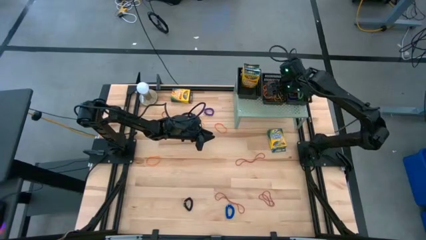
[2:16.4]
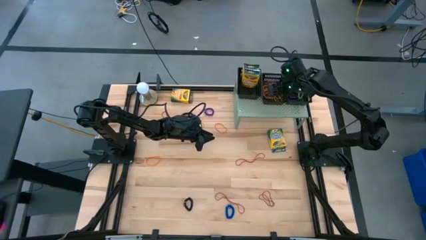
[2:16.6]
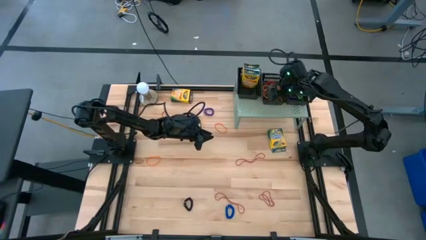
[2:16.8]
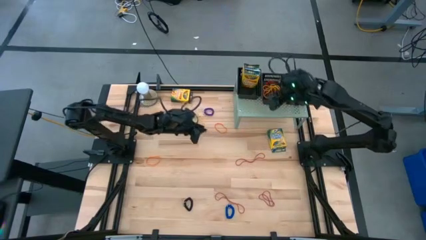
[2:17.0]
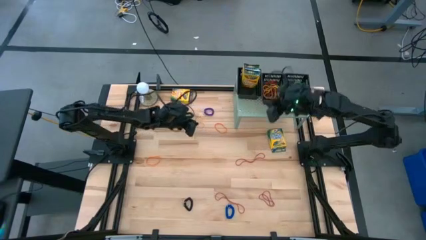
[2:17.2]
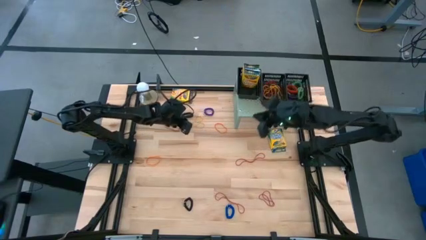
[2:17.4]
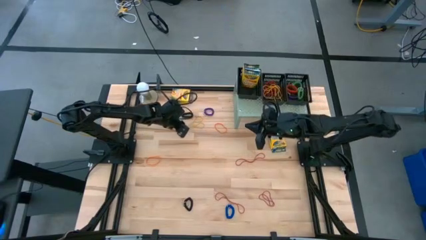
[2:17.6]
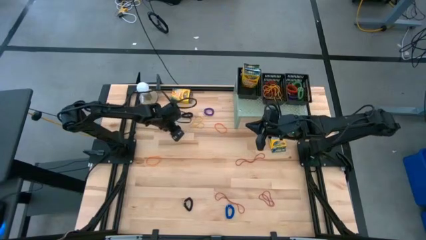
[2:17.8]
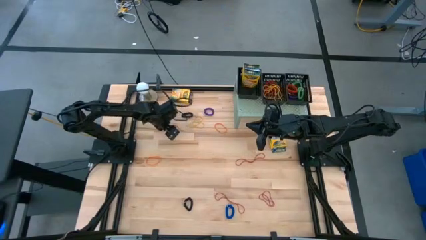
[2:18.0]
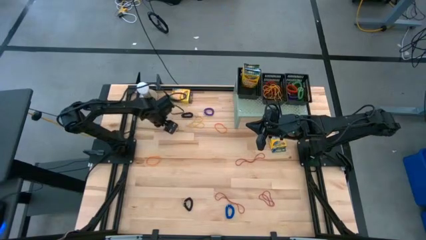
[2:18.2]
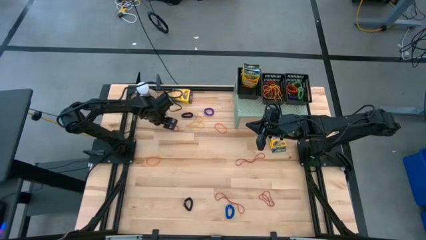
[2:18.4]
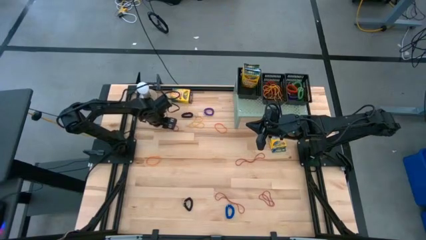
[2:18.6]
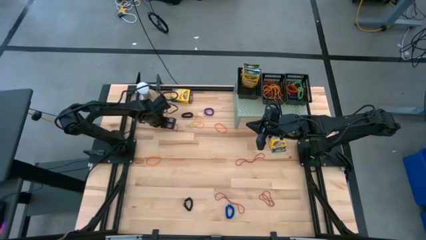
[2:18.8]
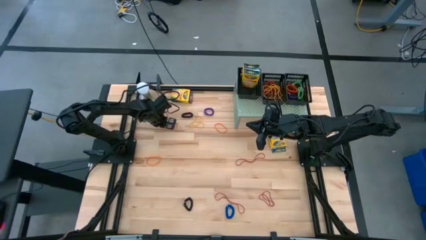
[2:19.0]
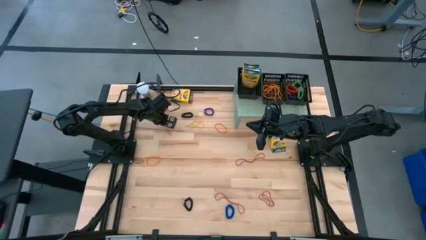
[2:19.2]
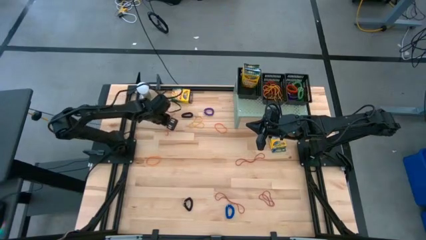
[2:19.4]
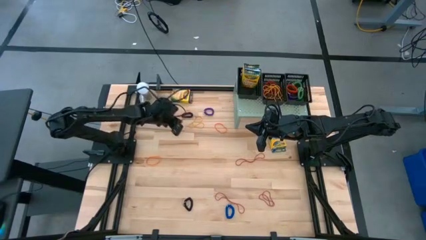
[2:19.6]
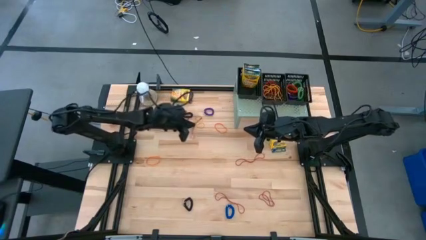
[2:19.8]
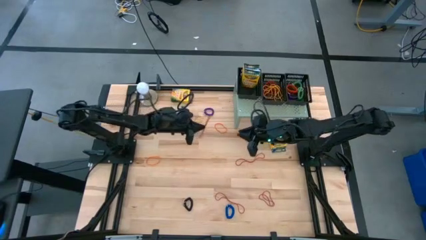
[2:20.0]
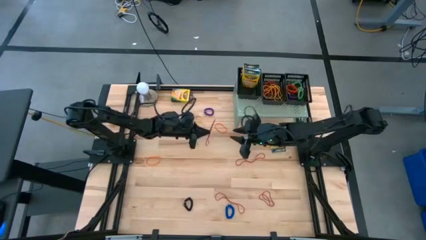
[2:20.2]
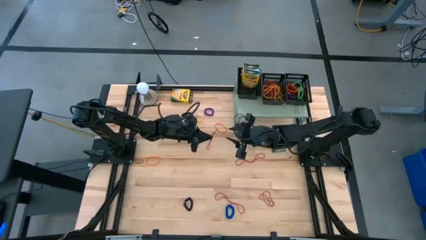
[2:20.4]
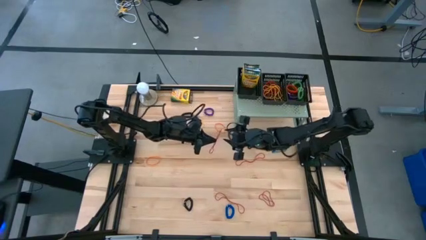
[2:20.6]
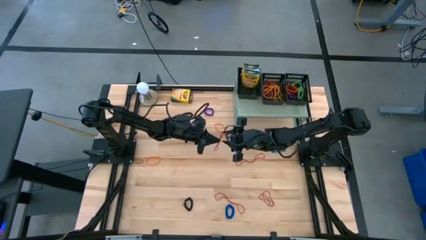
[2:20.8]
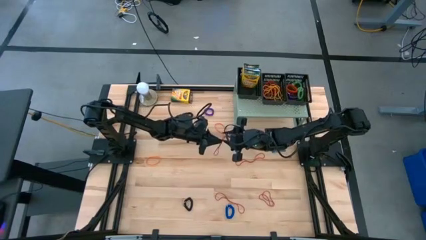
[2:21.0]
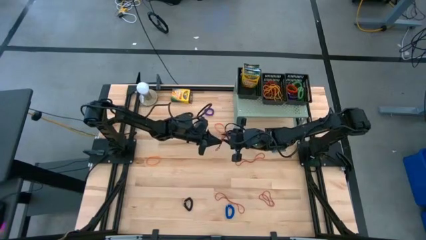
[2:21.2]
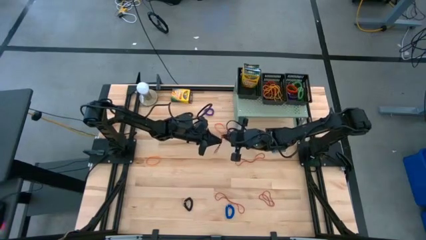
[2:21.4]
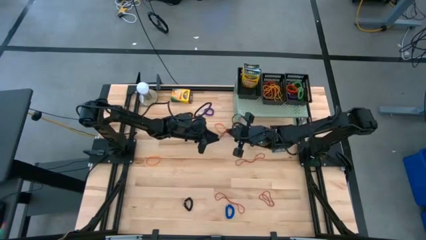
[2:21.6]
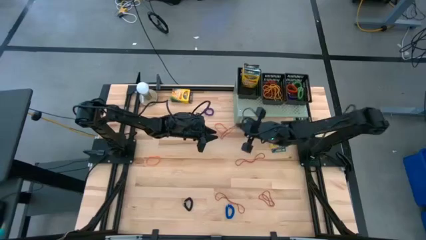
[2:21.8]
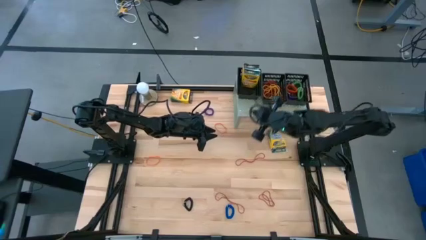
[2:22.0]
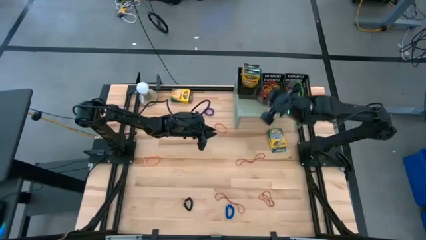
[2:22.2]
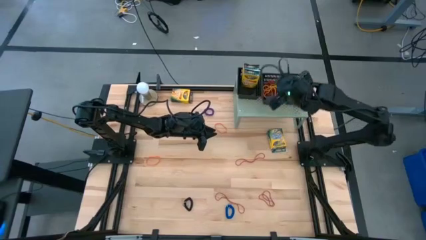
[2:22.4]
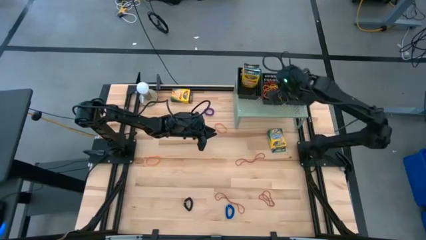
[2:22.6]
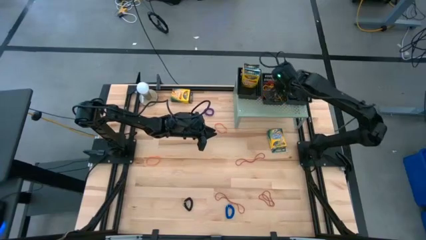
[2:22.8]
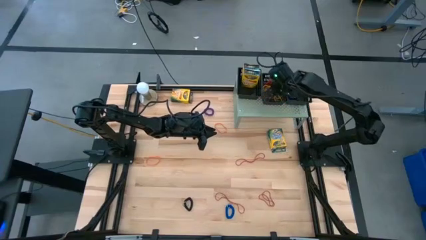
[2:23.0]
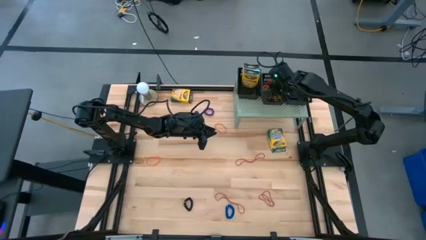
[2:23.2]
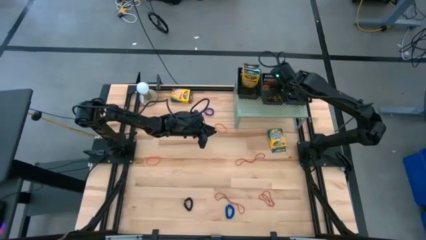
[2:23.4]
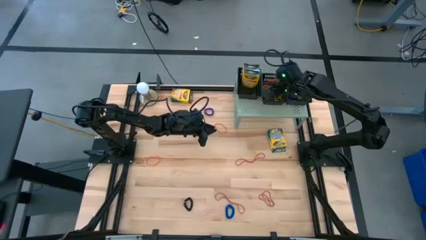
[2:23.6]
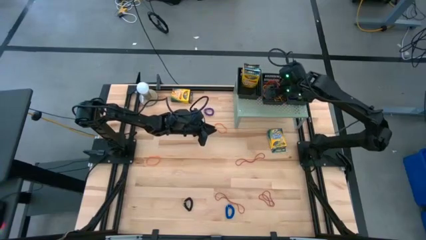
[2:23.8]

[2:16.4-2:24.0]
Task: Pick & Place Office Desk Supplies
Put the red rubber band into the middle black basket on the shelf

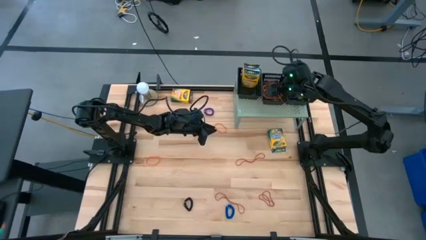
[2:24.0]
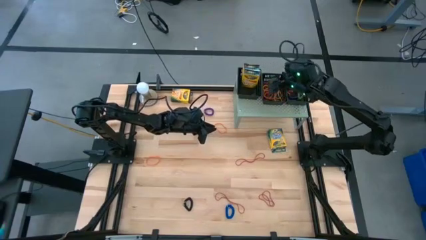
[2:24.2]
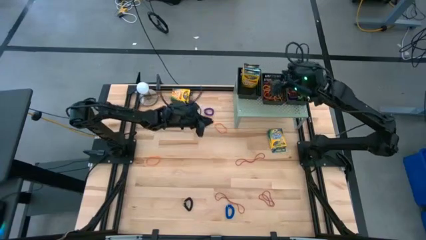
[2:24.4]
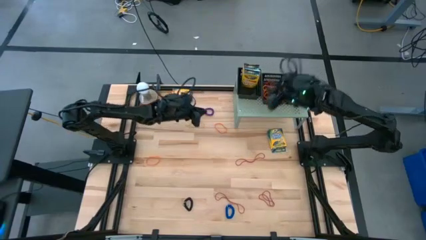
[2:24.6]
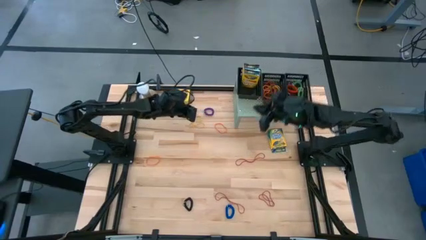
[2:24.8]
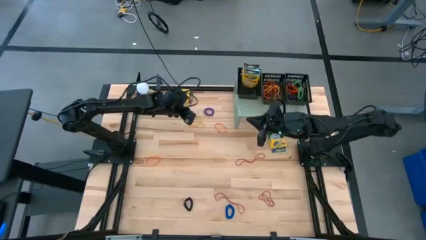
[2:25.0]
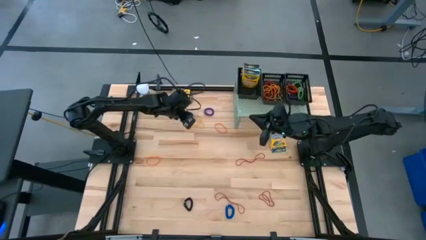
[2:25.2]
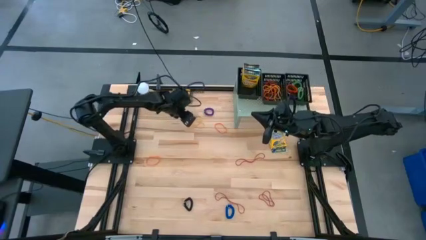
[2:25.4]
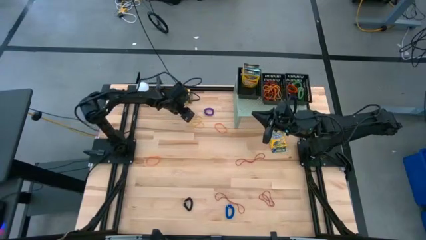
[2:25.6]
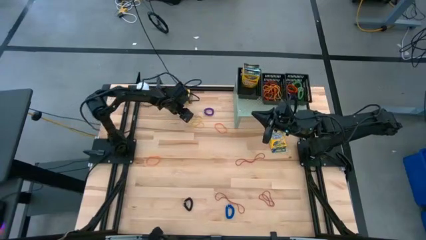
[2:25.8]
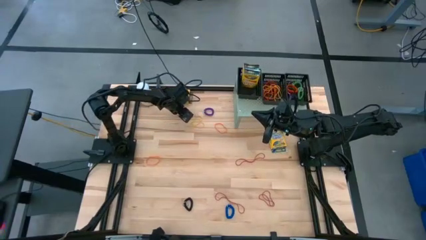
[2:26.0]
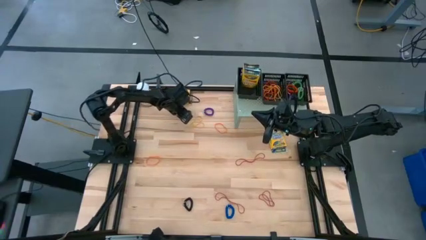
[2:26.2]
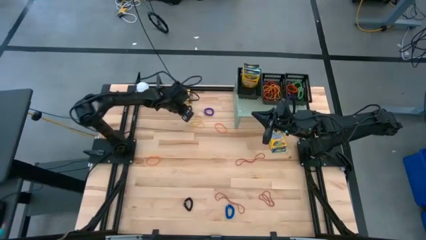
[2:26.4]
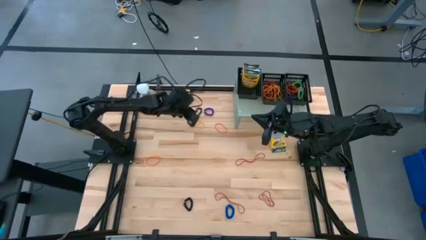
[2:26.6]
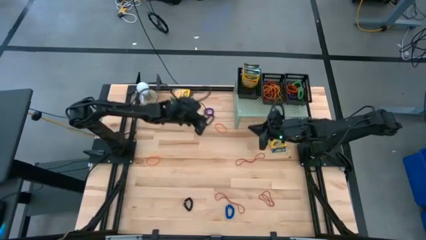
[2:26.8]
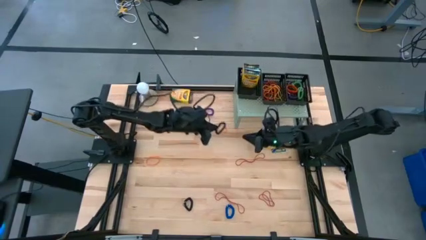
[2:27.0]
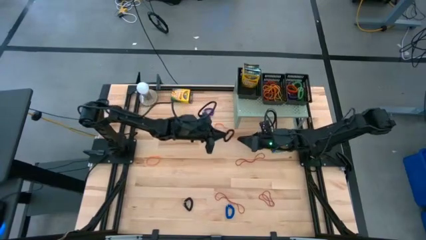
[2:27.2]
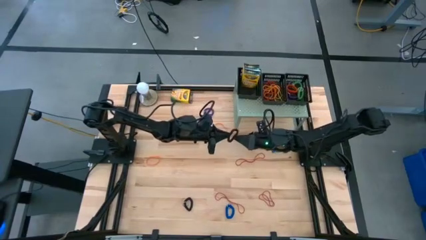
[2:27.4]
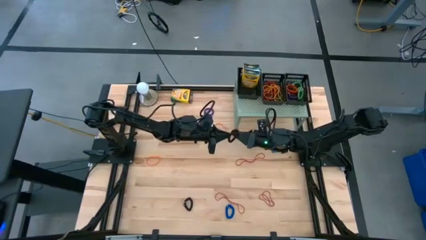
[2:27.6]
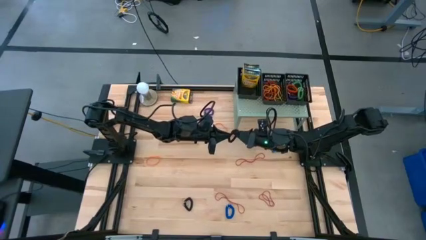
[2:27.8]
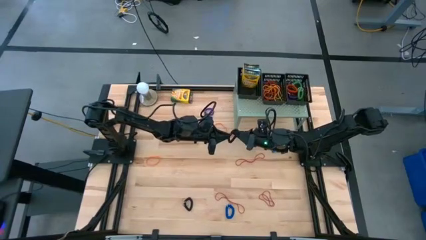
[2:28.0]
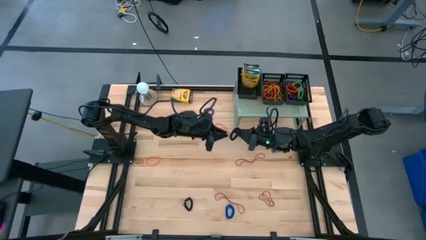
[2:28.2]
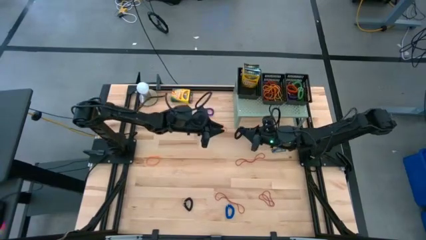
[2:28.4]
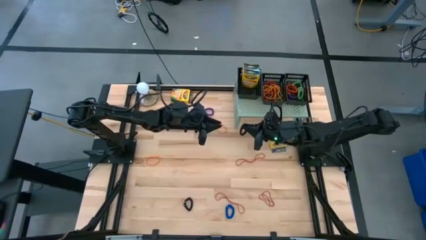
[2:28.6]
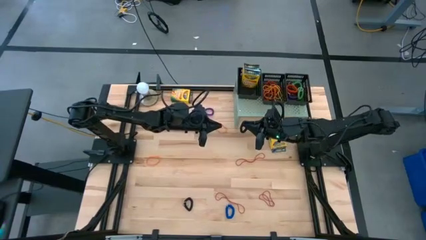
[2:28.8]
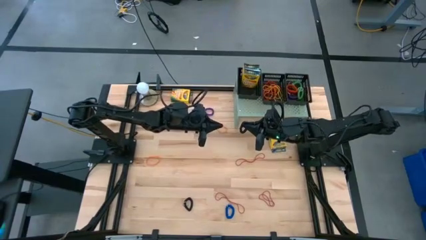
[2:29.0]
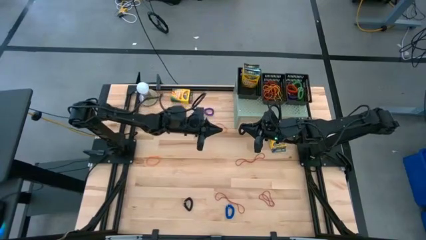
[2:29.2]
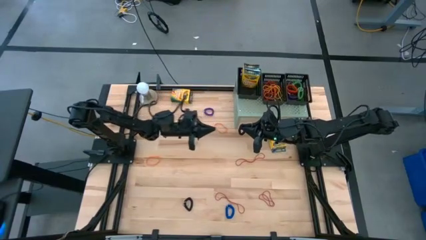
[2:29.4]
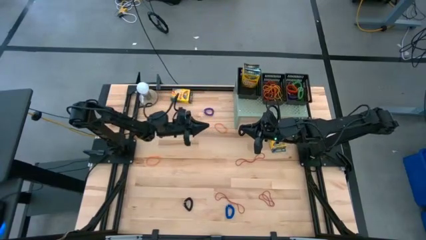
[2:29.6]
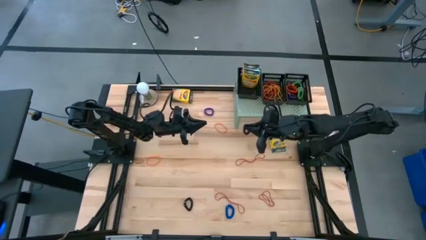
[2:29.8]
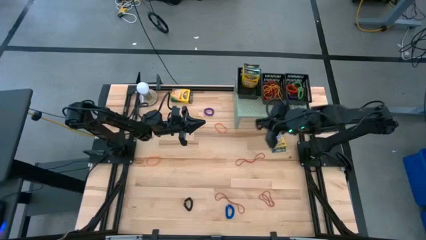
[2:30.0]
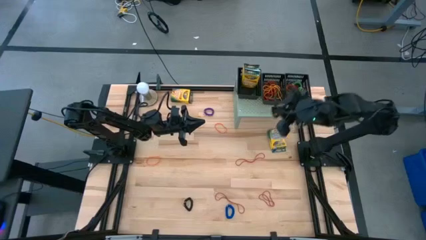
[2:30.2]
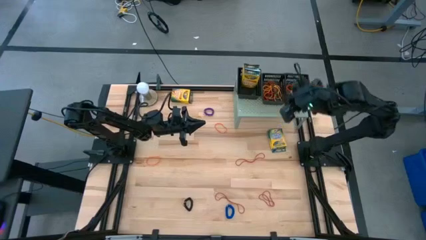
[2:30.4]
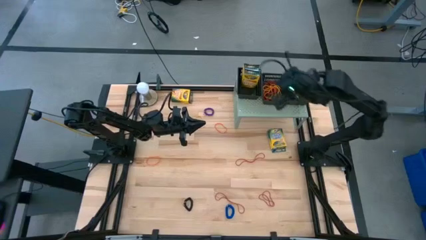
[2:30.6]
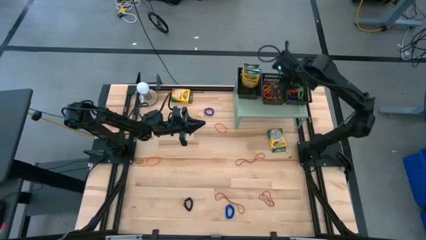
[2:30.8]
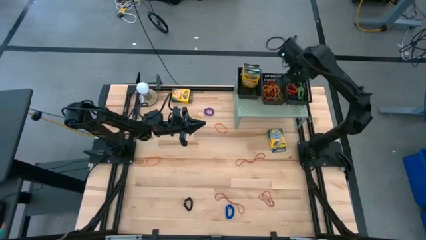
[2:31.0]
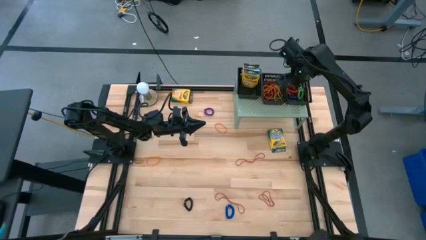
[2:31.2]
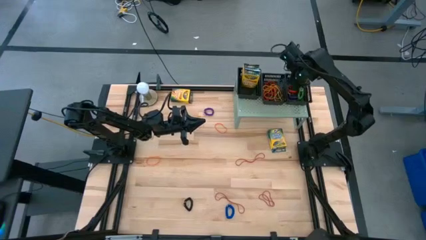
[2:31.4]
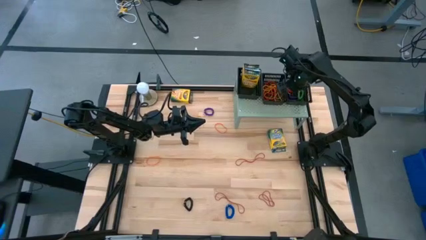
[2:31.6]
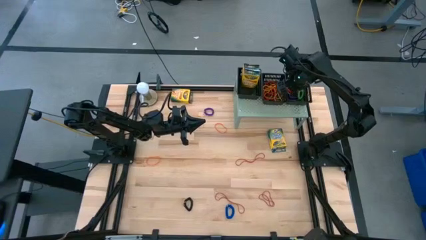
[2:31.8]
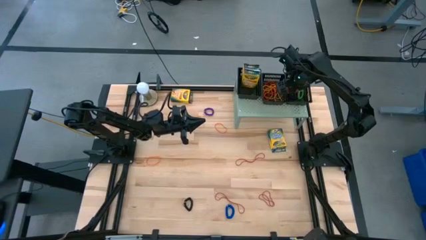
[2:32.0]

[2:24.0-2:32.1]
Put the top black spring key chain into the right black basket on the shelf
